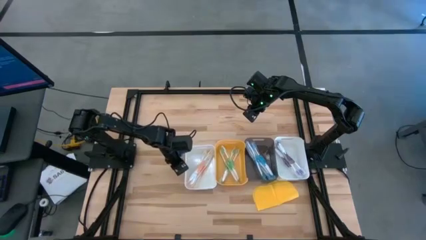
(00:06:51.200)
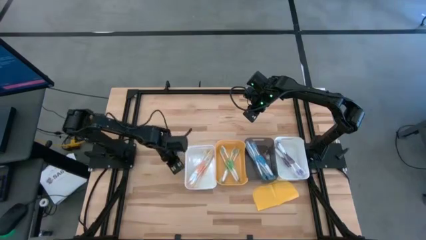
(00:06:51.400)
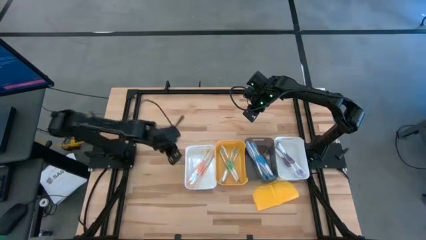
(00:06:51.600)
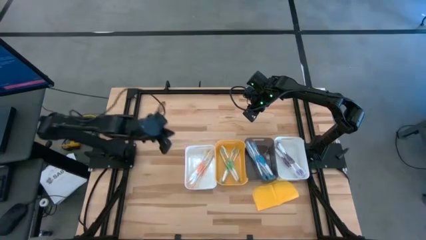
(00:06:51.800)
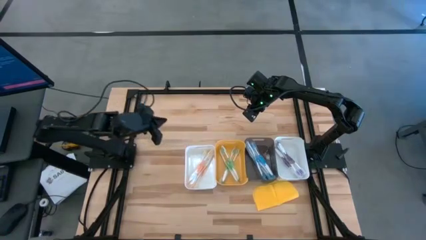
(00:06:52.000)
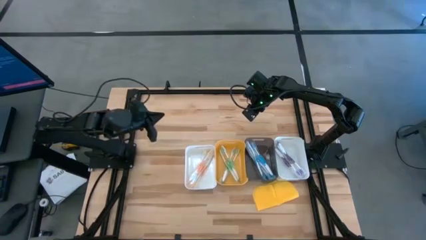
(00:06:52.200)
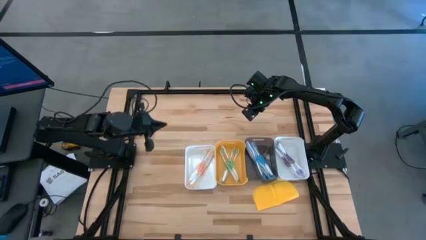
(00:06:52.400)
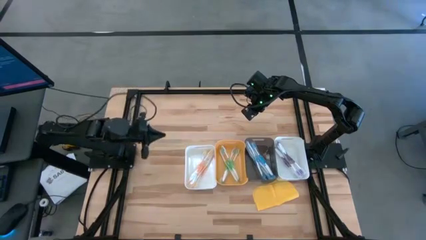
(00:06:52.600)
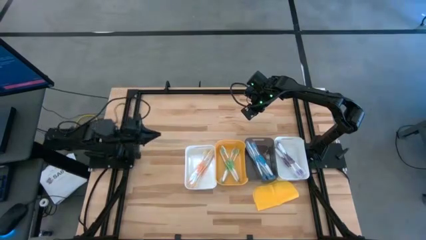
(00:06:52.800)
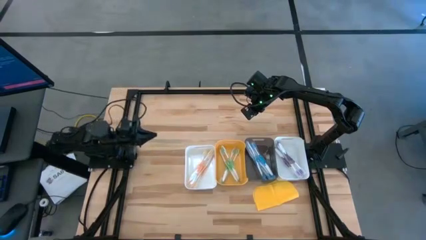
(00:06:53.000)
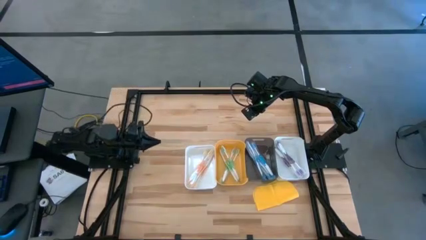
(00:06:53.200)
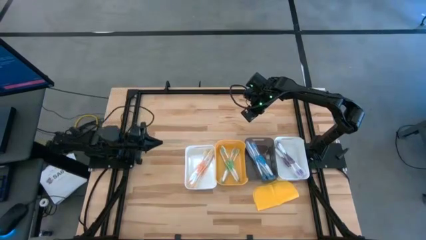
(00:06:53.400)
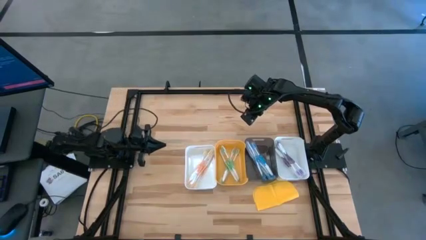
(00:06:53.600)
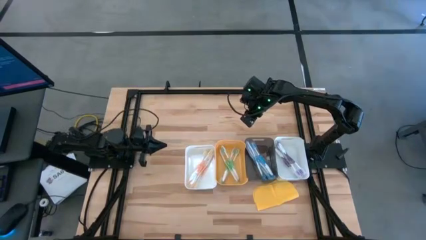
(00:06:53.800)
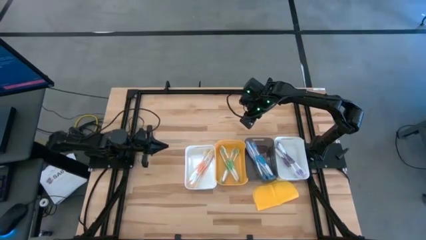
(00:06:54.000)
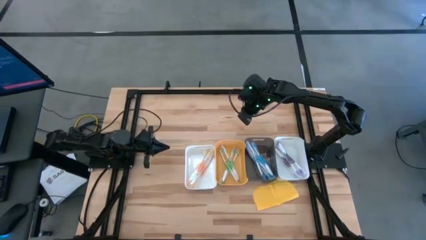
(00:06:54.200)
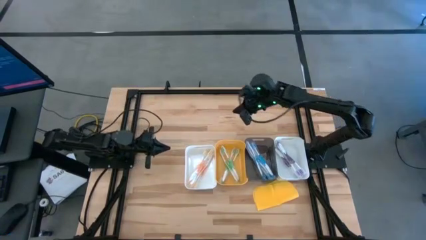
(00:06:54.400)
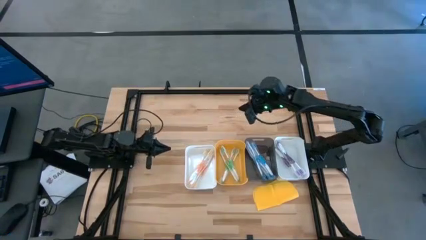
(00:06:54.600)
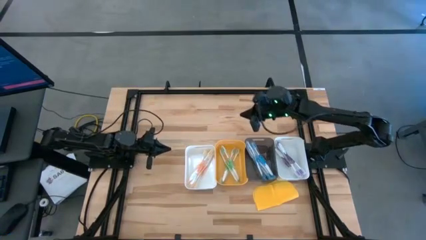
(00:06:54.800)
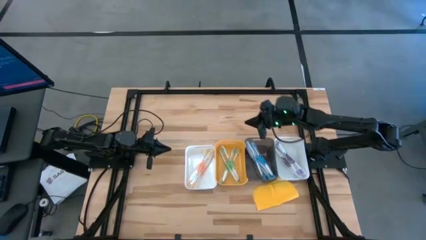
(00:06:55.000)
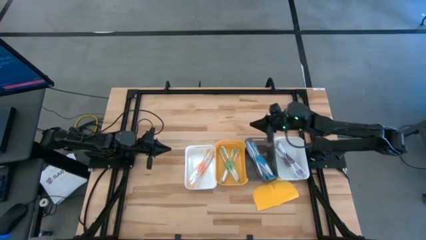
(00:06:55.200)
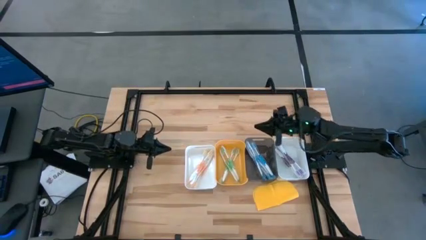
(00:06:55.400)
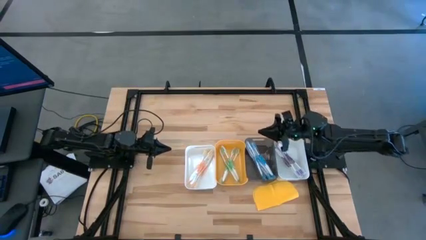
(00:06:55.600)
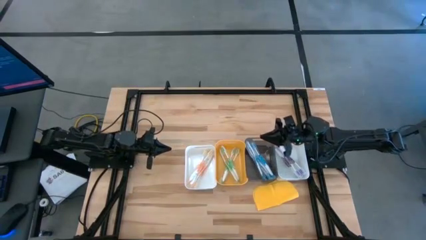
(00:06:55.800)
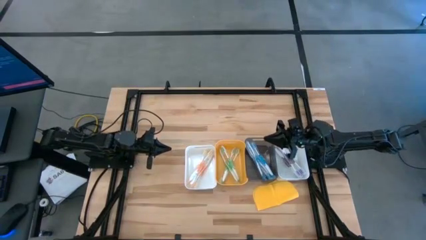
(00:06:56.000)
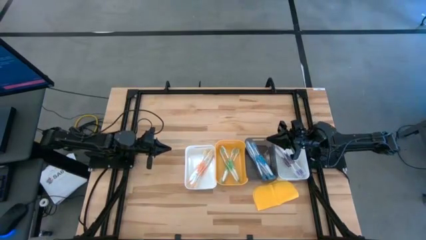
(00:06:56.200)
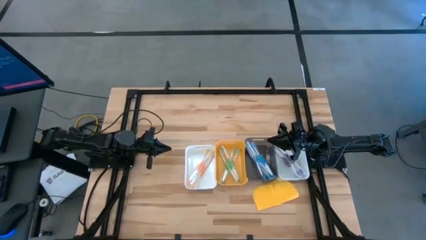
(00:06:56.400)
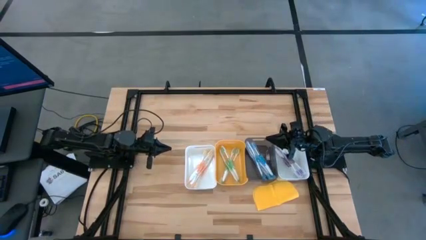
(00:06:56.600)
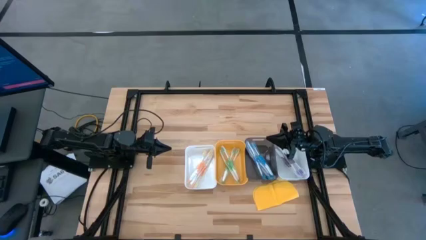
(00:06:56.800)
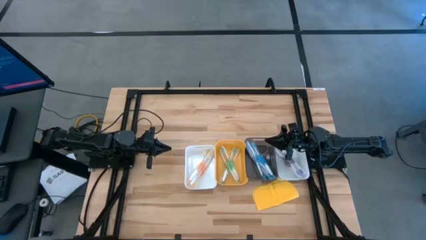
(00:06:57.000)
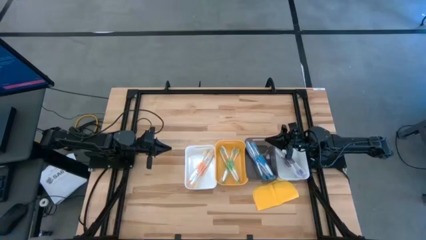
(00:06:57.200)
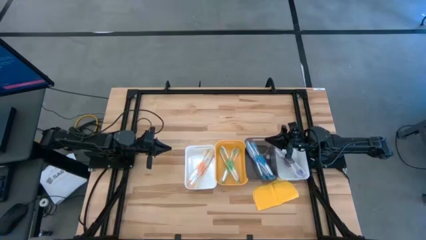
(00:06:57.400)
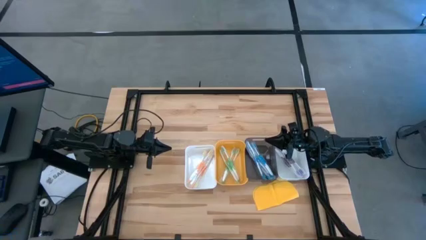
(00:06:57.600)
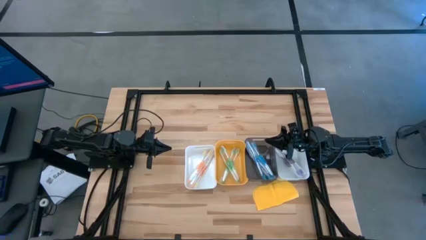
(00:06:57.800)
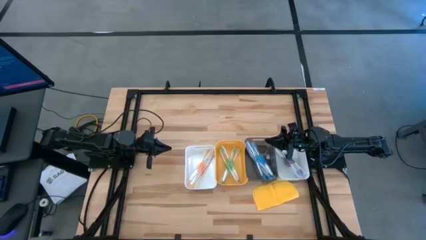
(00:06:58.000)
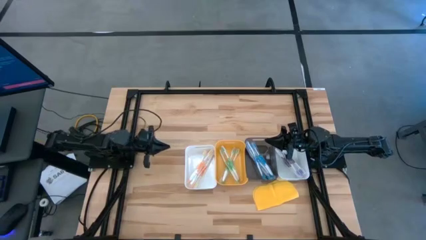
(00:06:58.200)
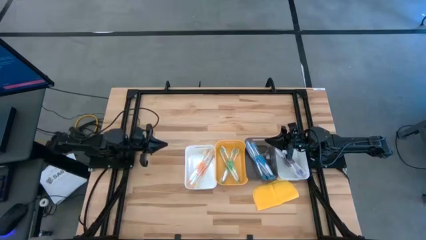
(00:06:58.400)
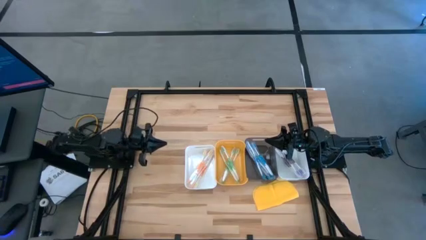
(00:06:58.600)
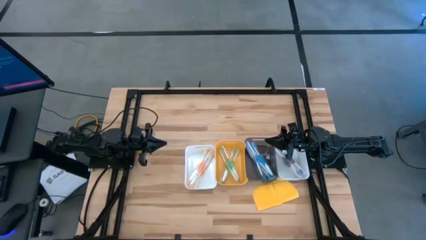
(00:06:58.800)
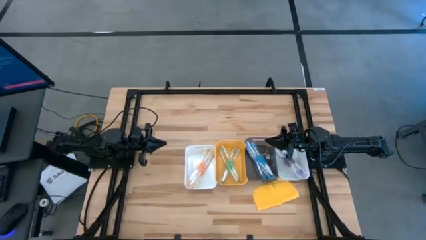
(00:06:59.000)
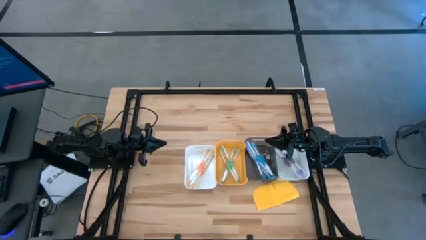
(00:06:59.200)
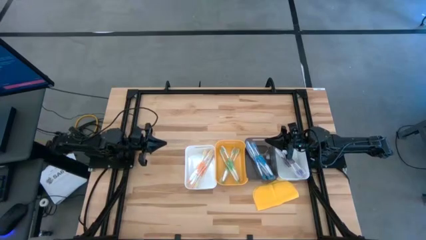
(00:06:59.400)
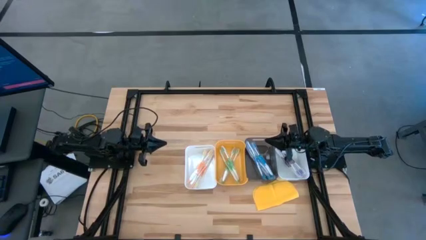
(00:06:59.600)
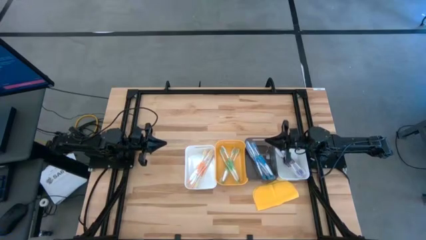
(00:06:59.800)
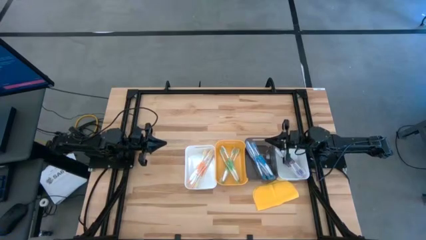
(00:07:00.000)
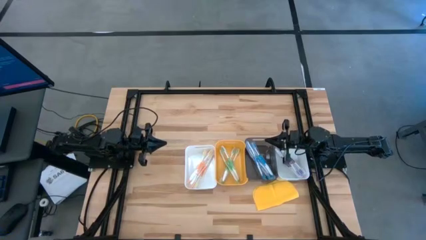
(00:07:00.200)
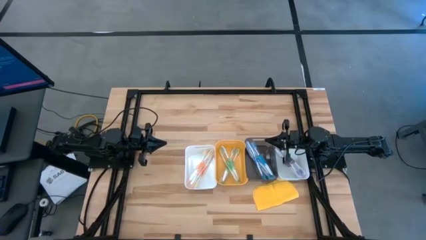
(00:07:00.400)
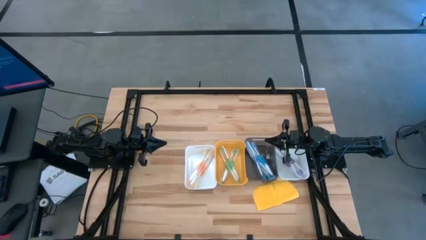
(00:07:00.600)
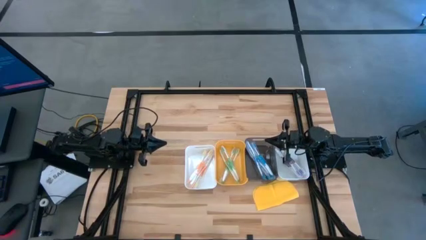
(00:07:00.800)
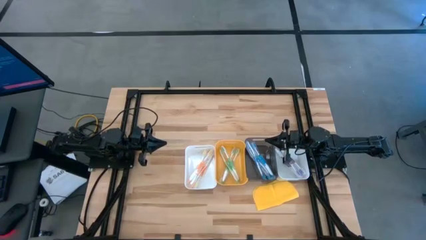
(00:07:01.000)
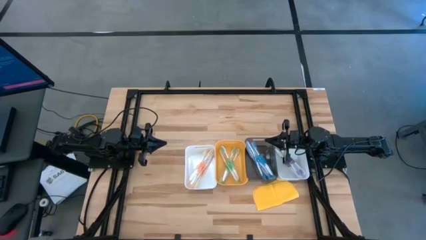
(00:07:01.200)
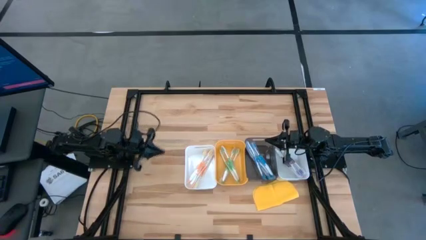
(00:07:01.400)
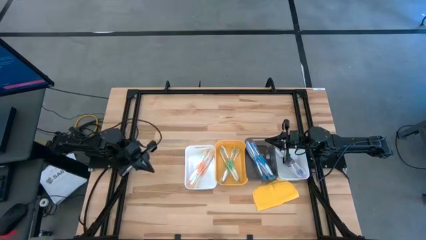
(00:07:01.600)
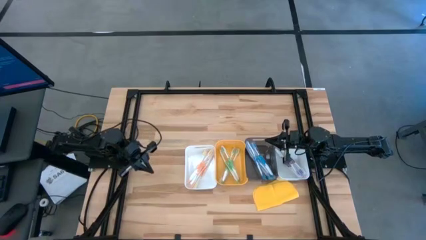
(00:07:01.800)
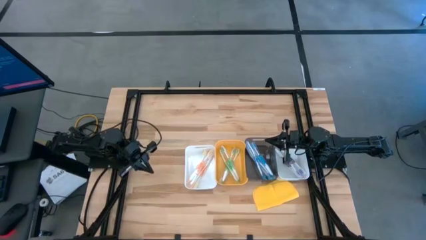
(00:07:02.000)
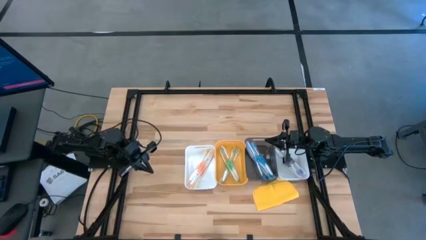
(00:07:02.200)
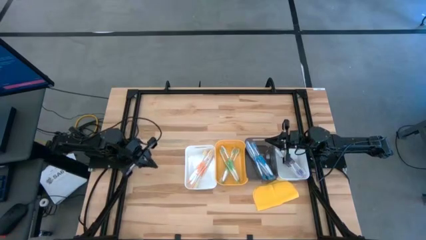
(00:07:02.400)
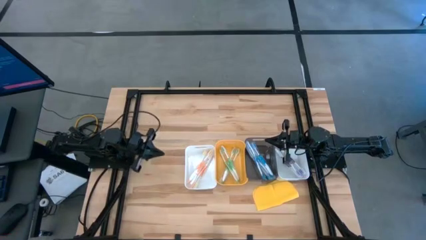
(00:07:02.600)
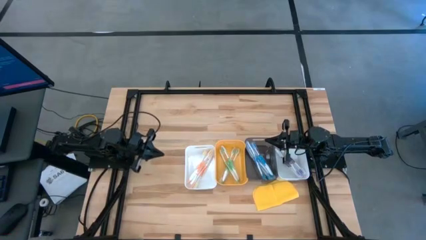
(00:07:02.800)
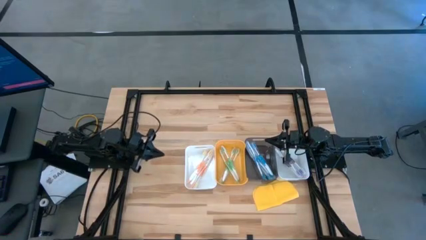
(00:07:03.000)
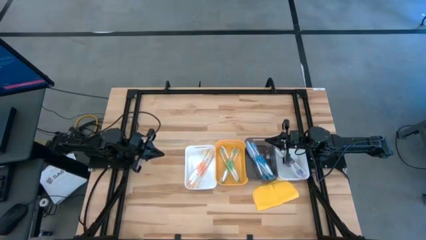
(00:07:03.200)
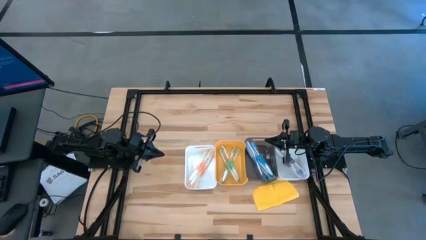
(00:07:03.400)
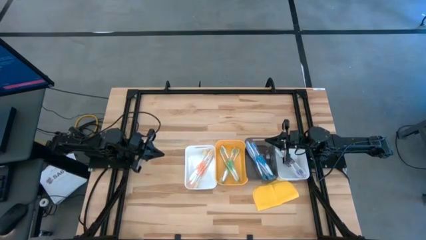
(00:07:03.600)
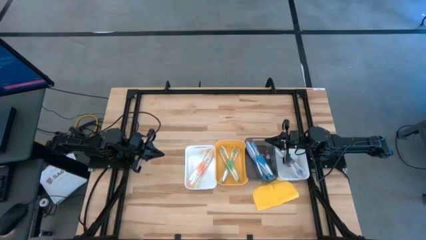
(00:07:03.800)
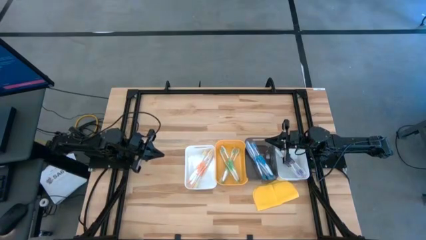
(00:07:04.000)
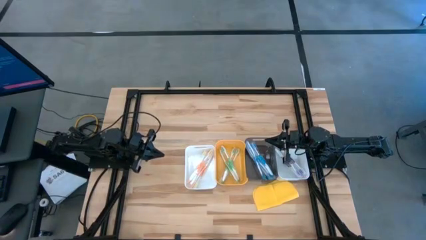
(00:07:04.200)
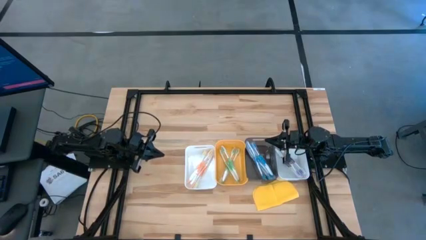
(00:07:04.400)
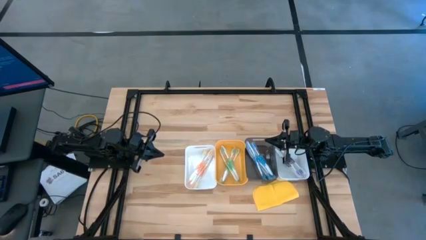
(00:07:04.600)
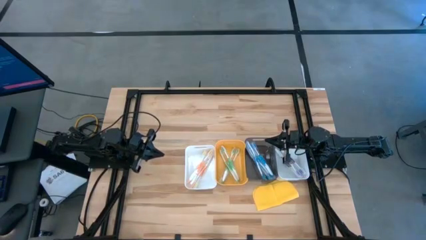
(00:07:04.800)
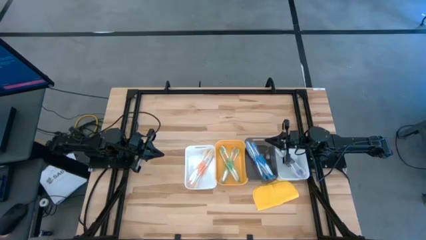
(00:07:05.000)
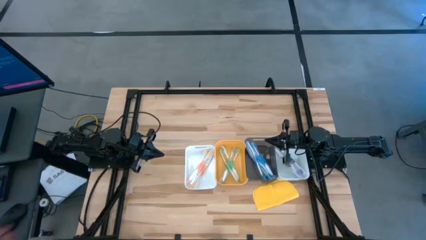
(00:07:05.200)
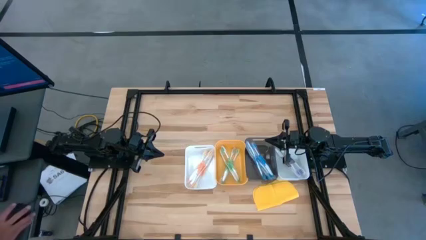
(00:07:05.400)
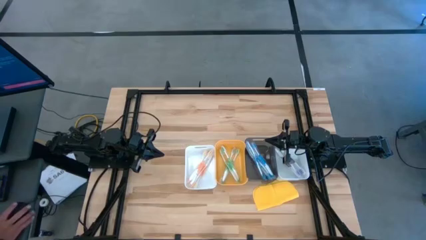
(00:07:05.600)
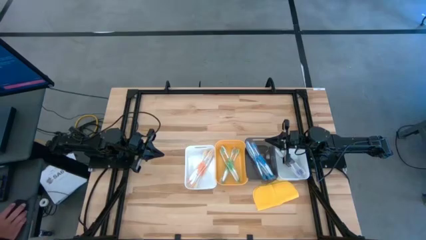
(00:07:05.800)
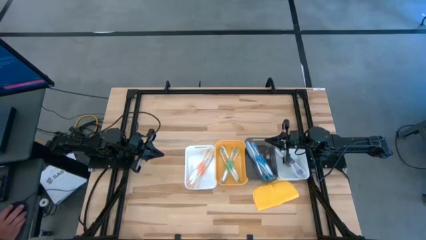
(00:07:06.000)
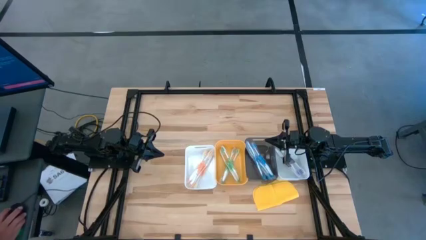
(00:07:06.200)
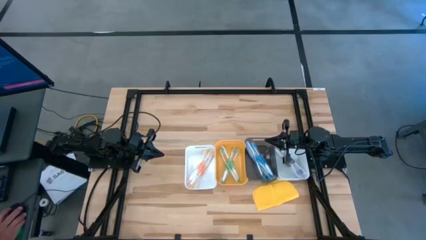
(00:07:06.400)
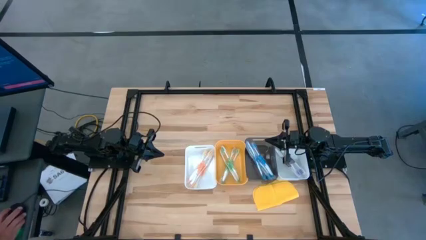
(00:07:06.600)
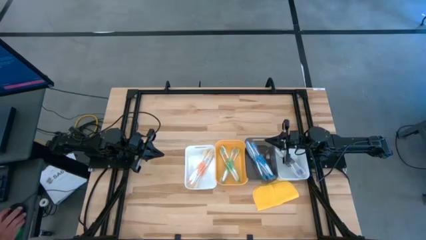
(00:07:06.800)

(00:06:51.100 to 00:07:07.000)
Task: Pick & Place Toothbrushes
Return to Home Position
